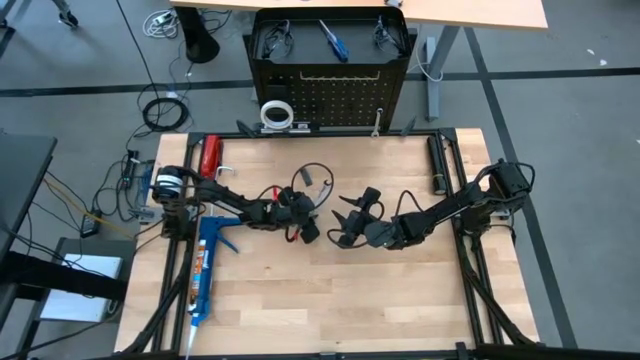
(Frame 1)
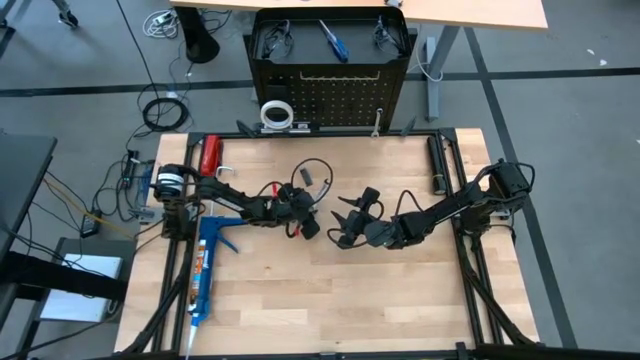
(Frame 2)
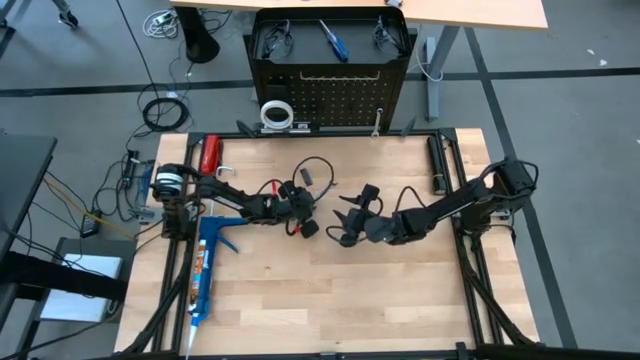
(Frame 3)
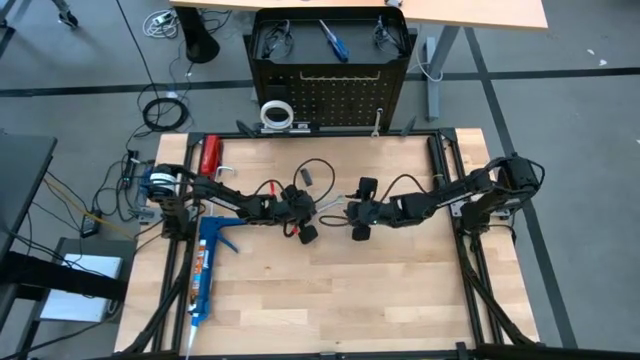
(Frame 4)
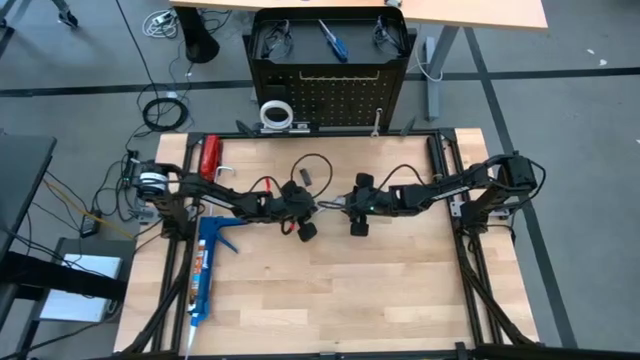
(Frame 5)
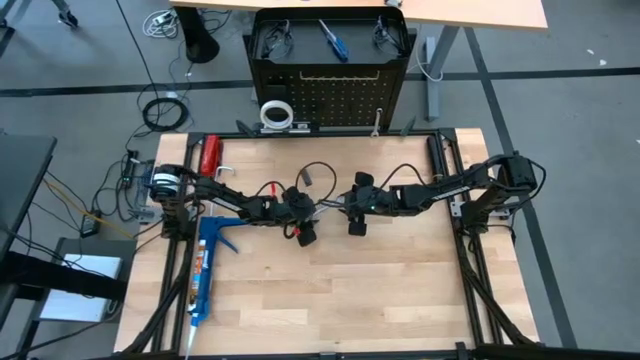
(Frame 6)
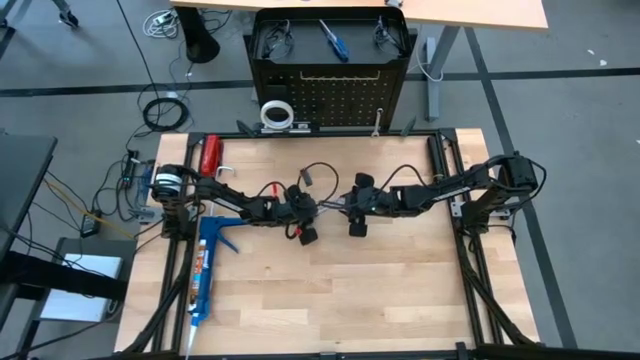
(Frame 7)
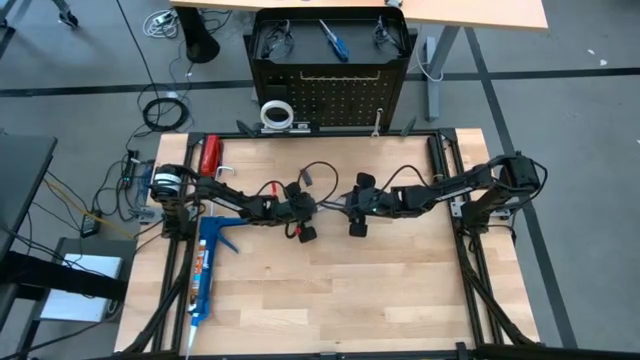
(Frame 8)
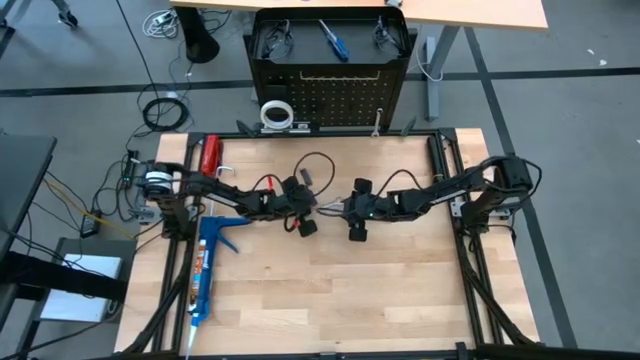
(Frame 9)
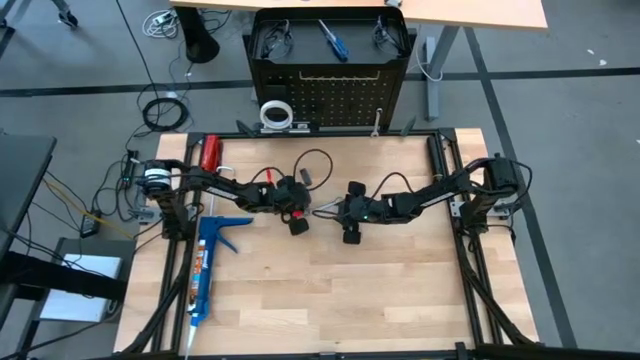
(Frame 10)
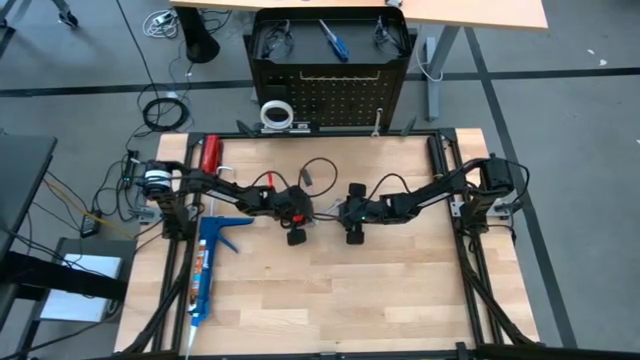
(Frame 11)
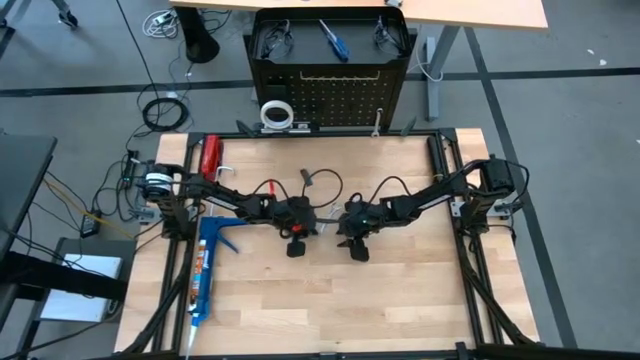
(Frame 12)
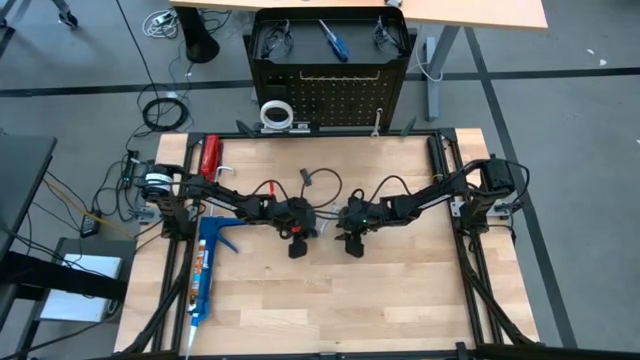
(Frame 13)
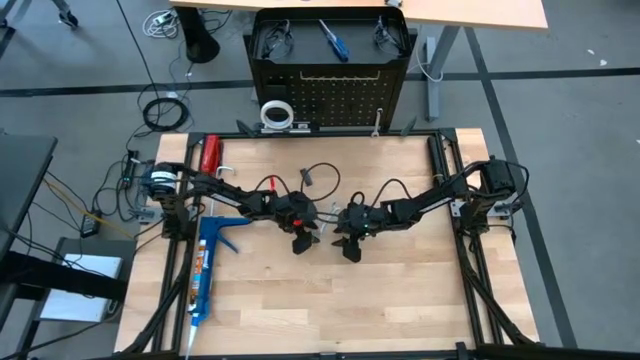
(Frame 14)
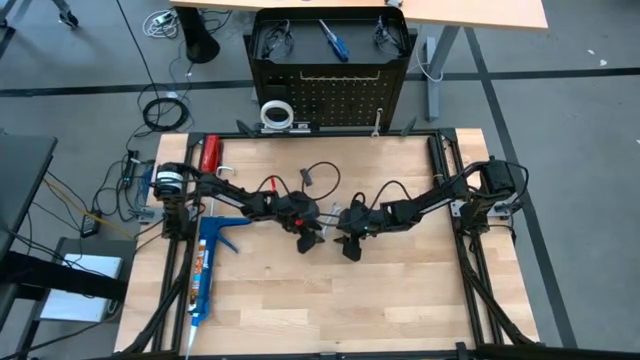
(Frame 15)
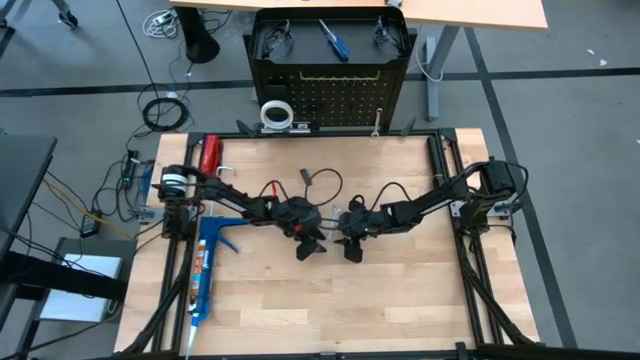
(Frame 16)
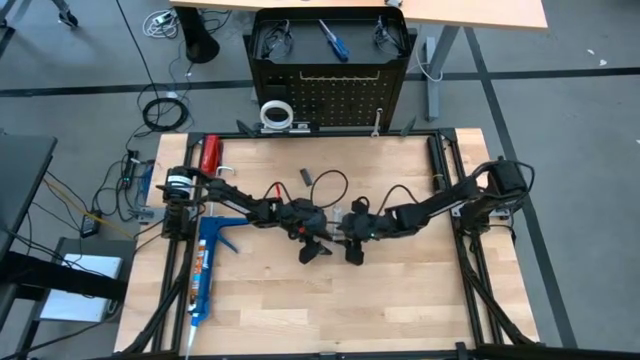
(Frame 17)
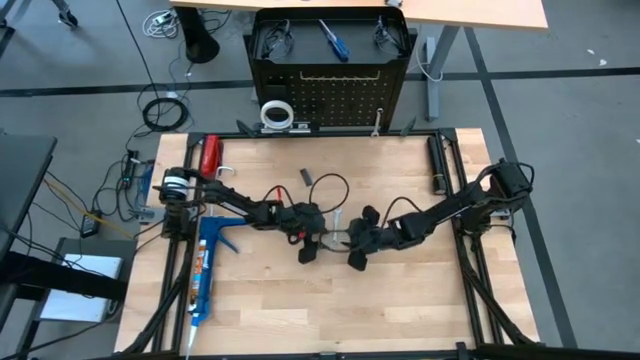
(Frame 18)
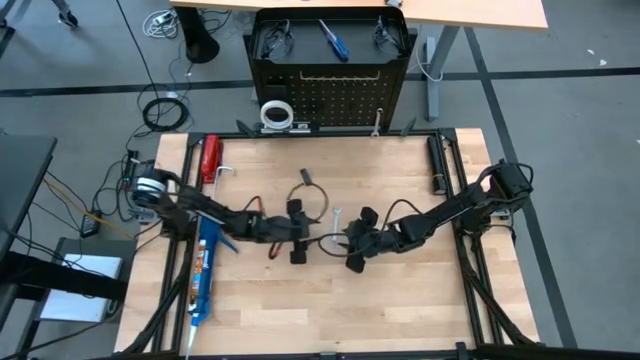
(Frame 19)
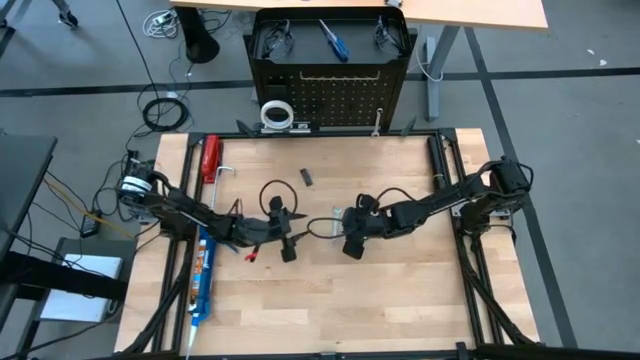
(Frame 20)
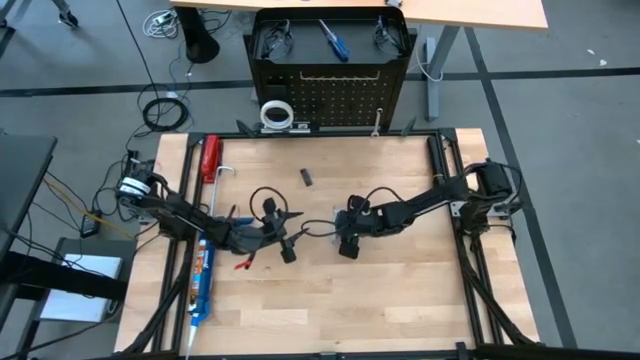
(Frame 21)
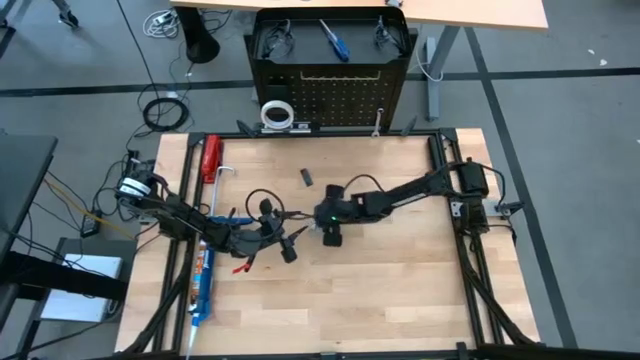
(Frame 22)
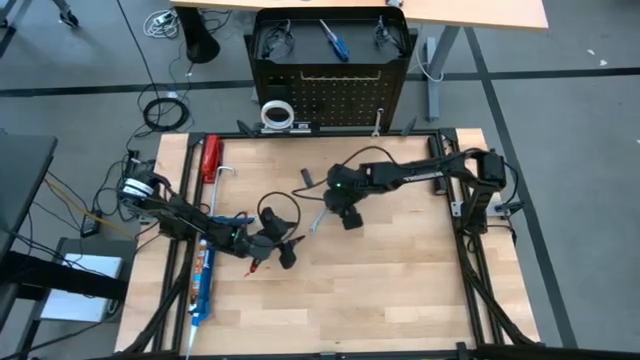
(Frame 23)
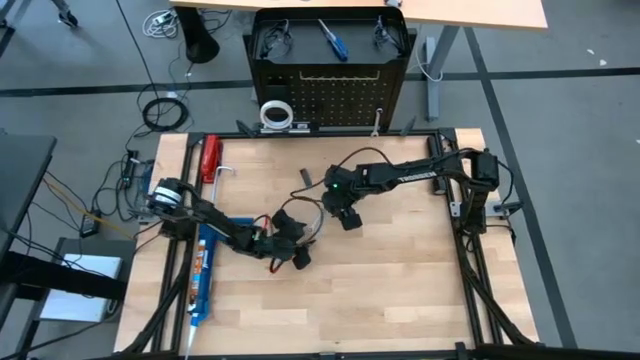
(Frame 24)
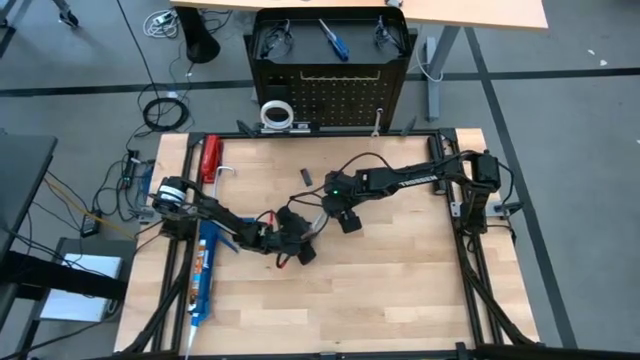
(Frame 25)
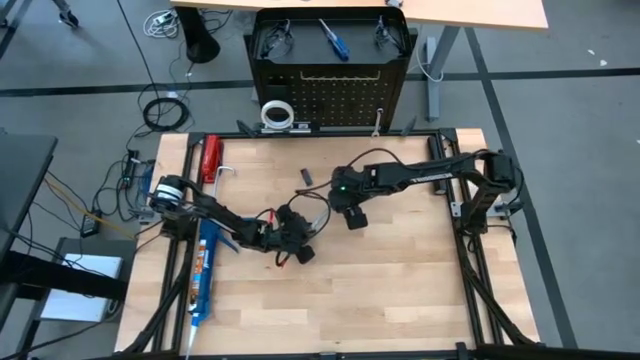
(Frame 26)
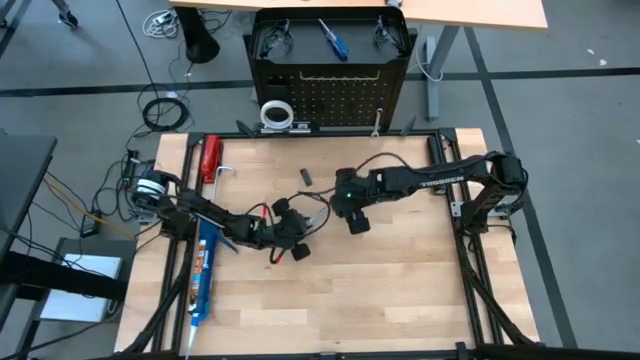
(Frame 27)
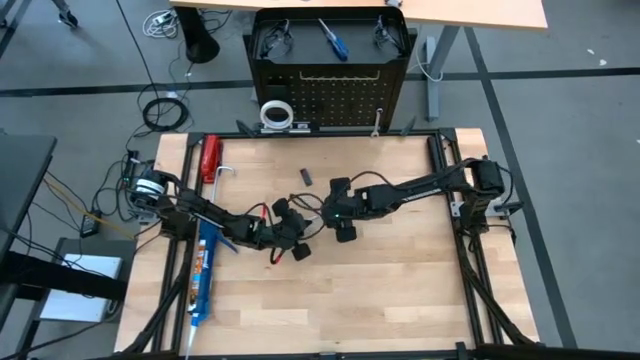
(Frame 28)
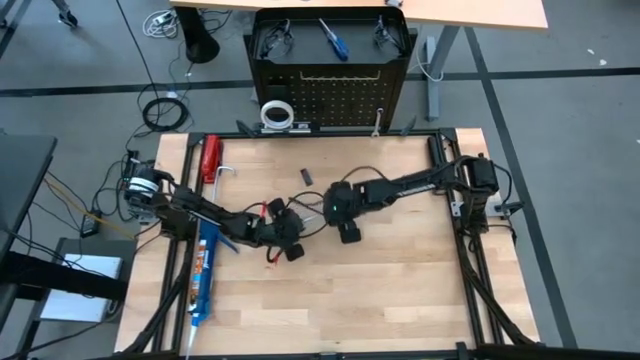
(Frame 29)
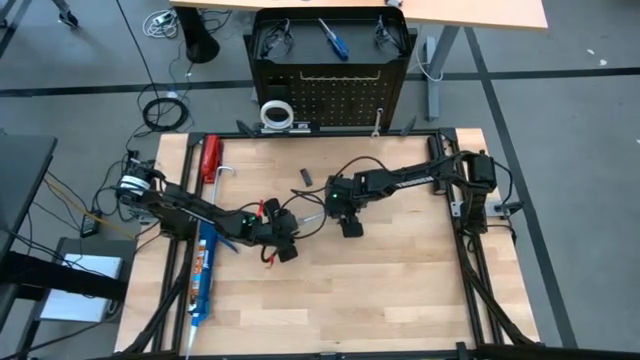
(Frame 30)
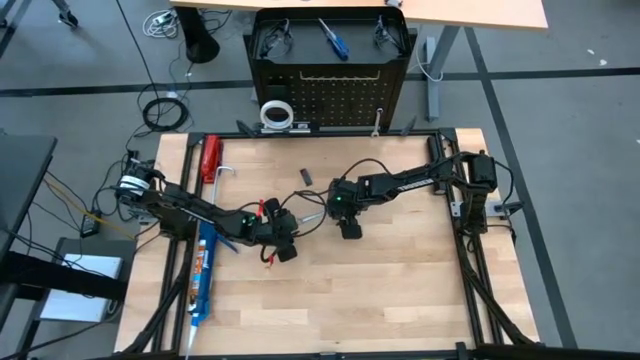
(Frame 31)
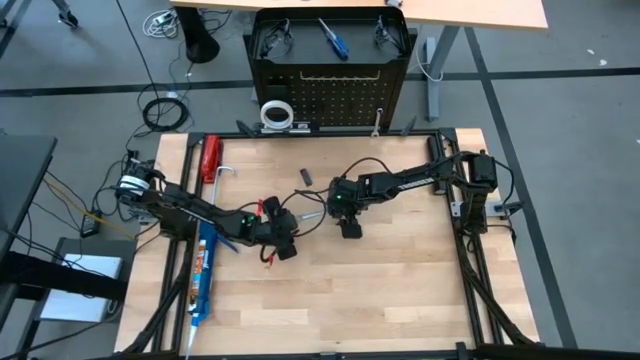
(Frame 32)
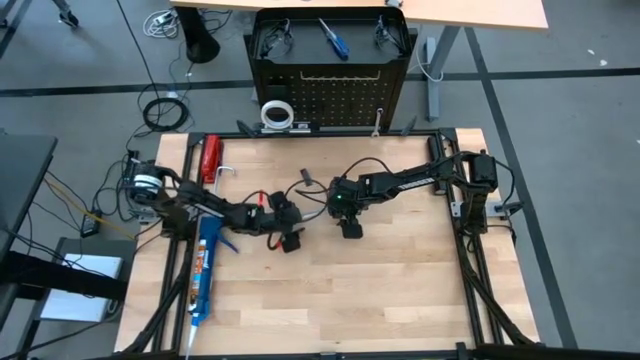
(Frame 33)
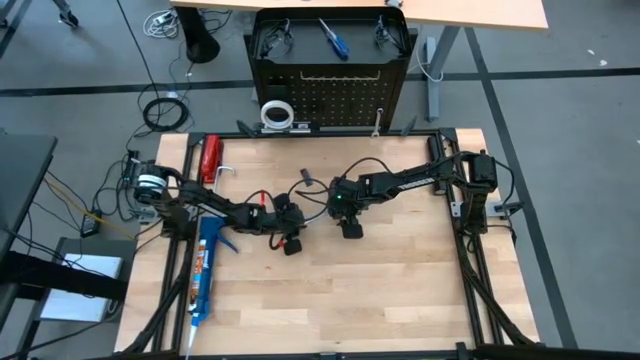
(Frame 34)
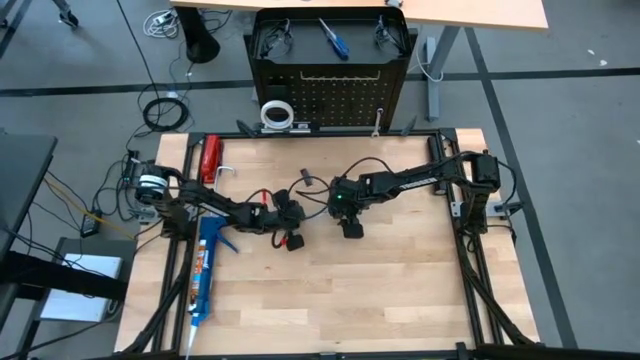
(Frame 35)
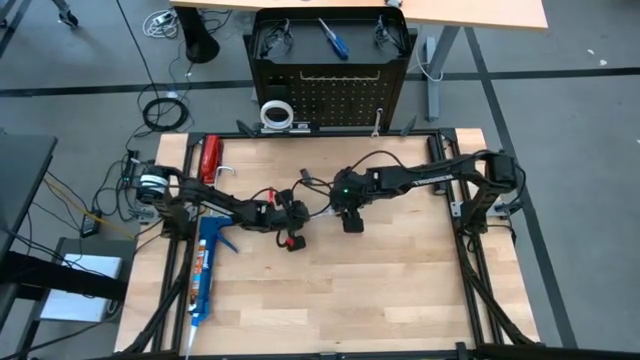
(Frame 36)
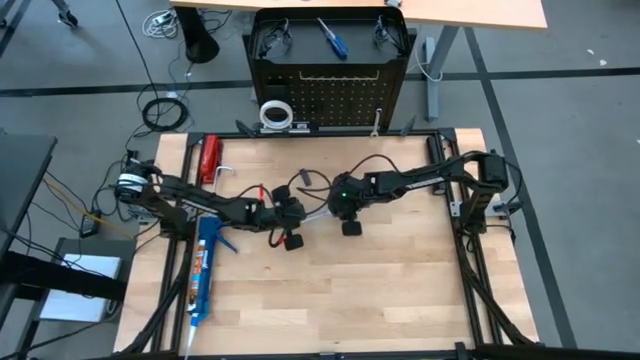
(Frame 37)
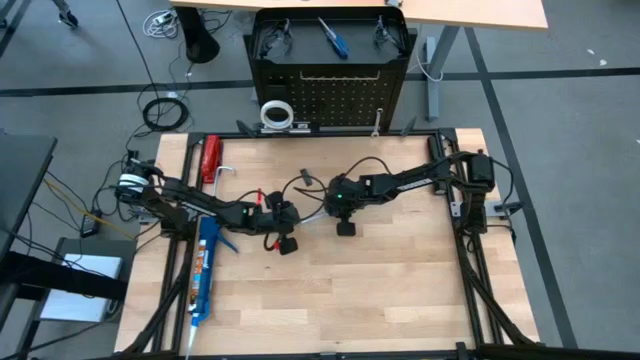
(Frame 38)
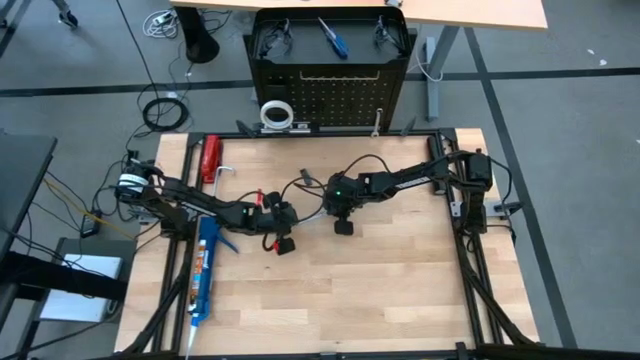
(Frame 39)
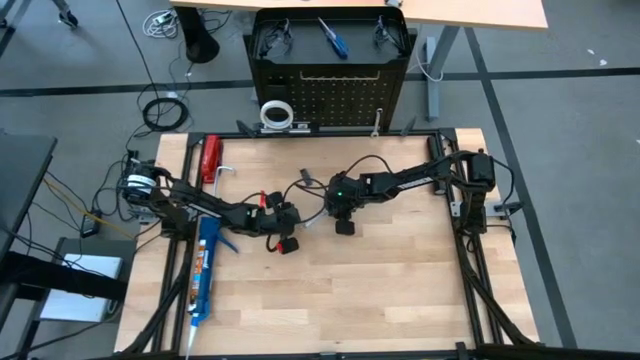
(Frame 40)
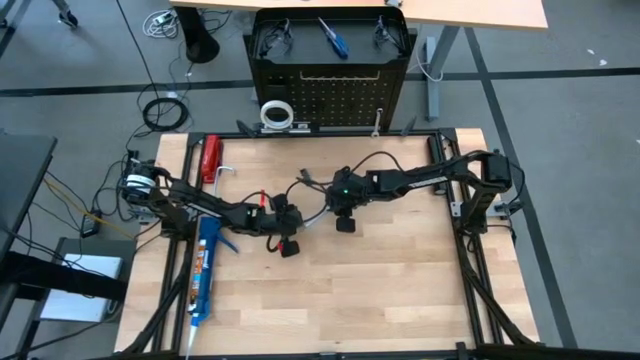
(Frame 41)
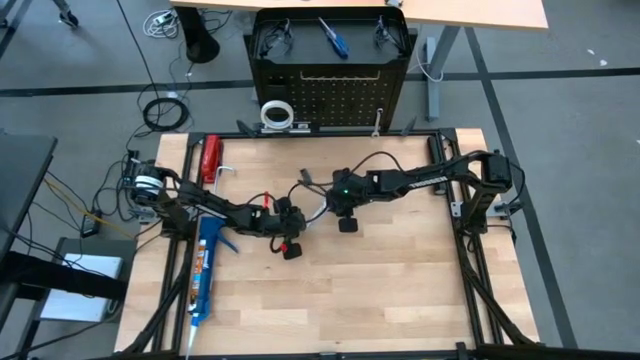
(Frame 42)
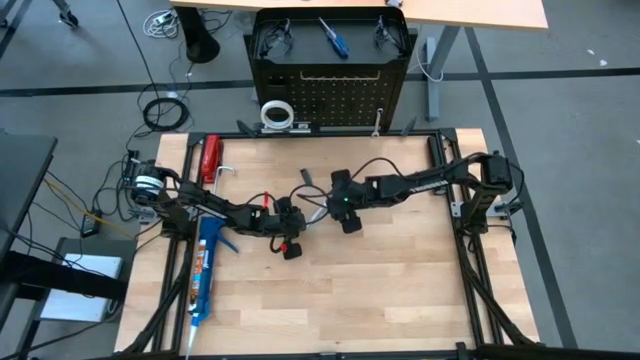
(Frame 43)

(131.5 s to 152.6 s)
Task: Hang tools onto peg board
Hang the wrench onto the black pegboard
